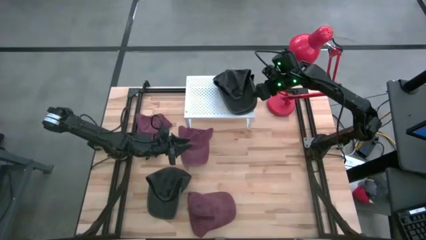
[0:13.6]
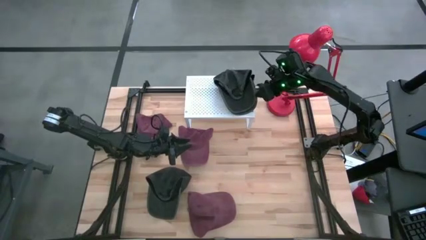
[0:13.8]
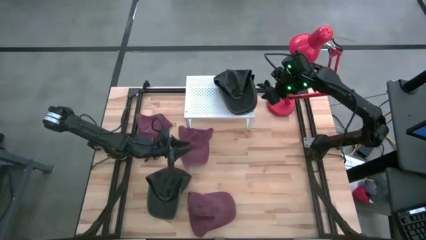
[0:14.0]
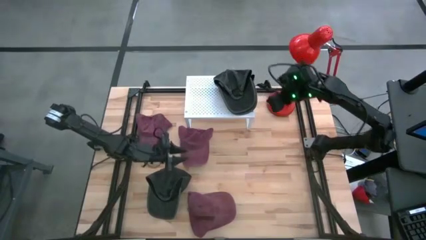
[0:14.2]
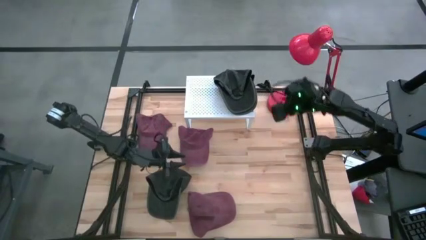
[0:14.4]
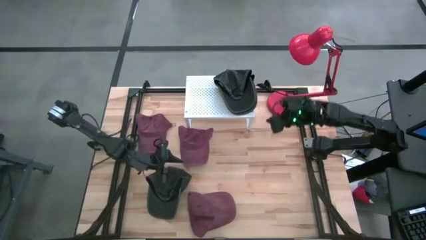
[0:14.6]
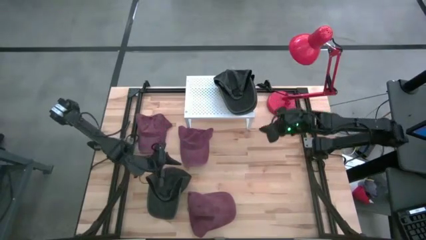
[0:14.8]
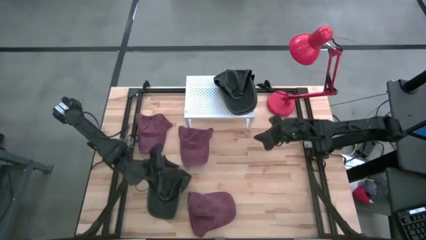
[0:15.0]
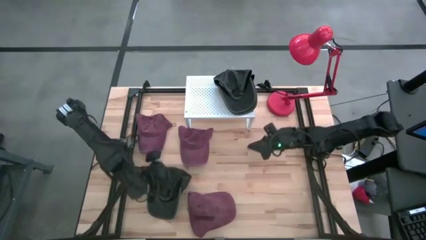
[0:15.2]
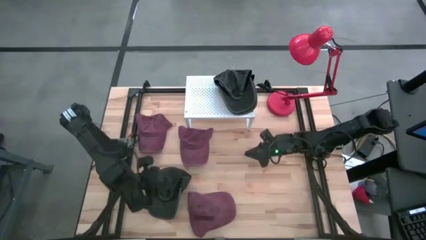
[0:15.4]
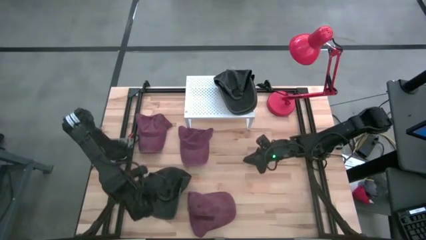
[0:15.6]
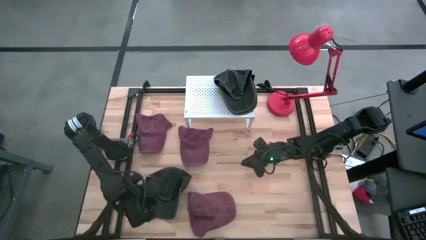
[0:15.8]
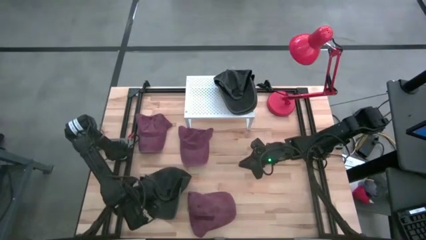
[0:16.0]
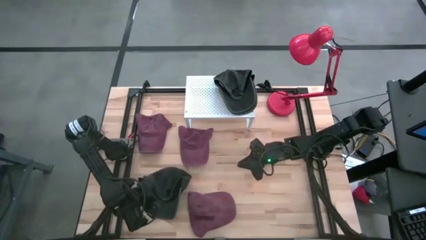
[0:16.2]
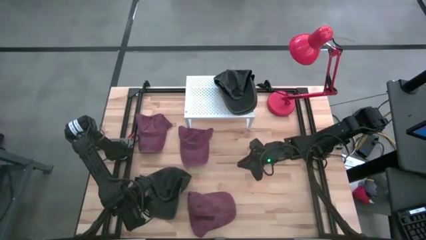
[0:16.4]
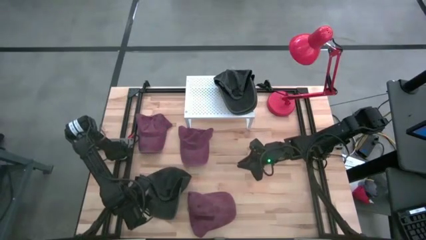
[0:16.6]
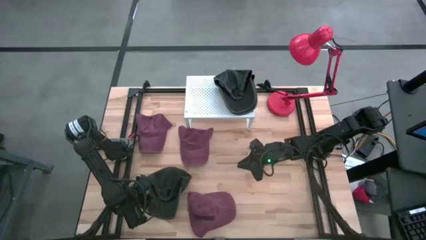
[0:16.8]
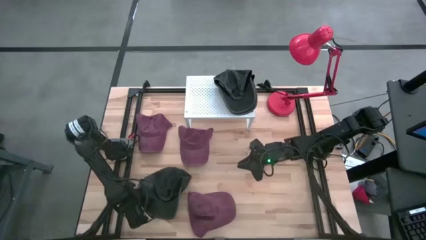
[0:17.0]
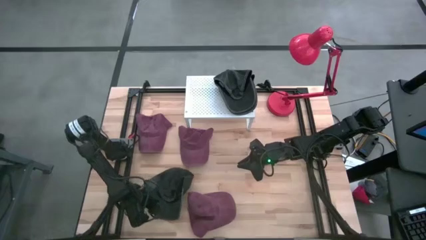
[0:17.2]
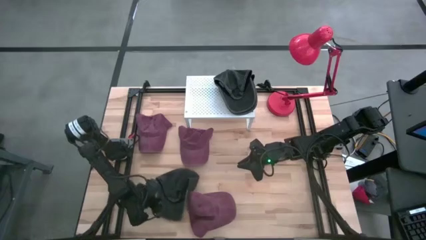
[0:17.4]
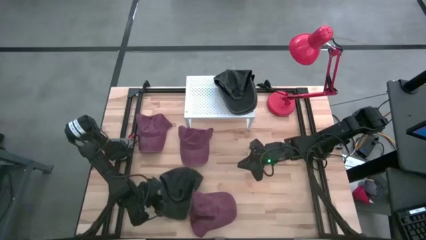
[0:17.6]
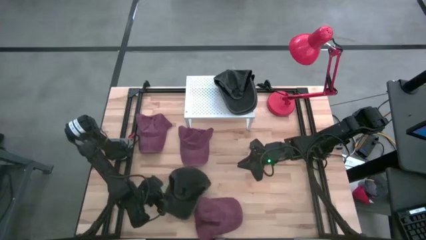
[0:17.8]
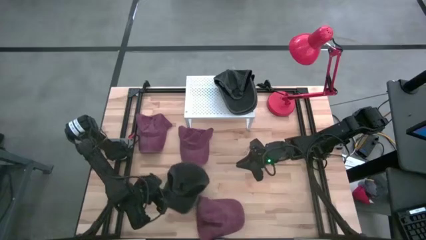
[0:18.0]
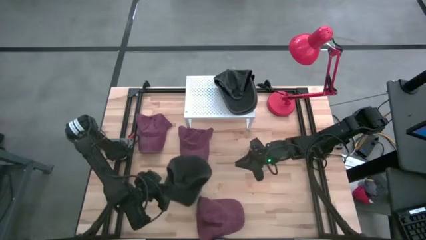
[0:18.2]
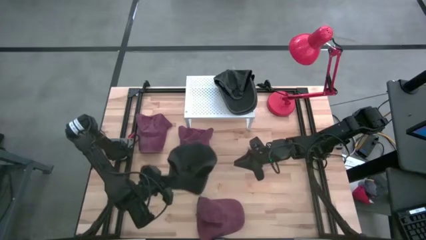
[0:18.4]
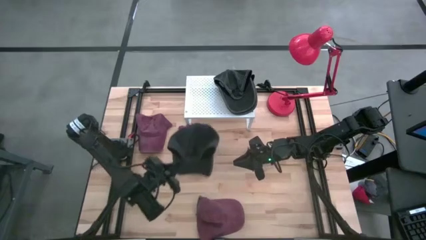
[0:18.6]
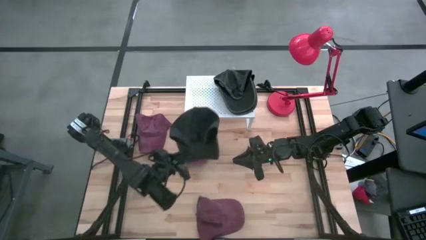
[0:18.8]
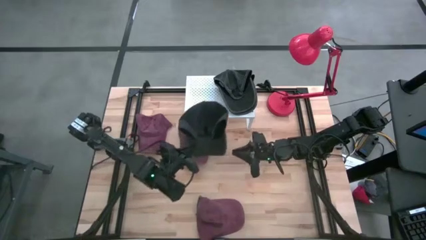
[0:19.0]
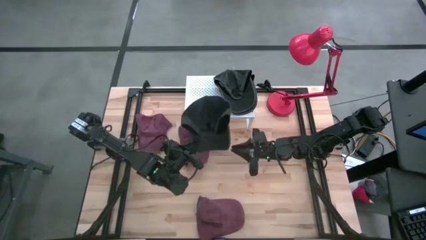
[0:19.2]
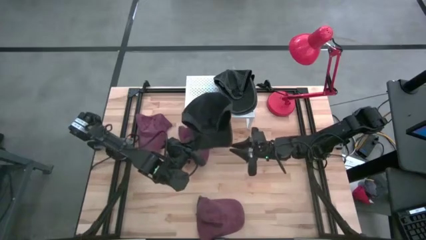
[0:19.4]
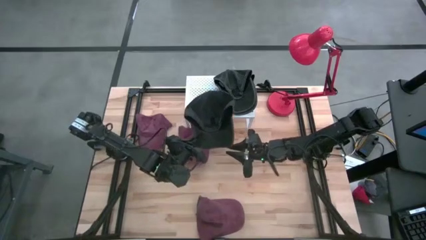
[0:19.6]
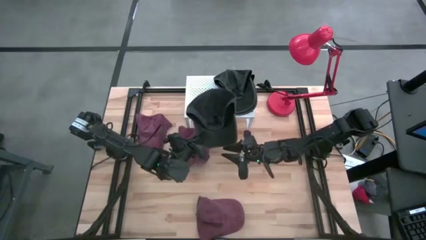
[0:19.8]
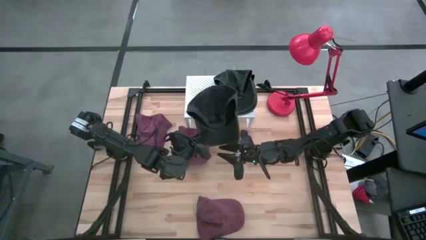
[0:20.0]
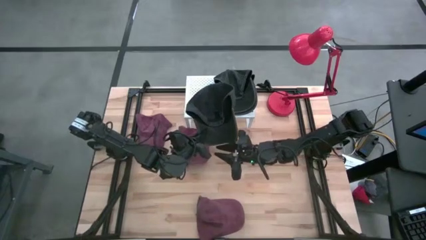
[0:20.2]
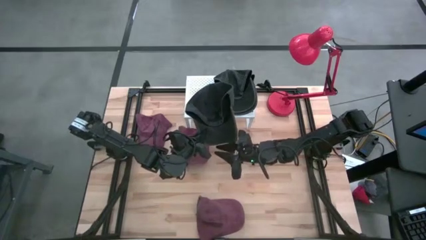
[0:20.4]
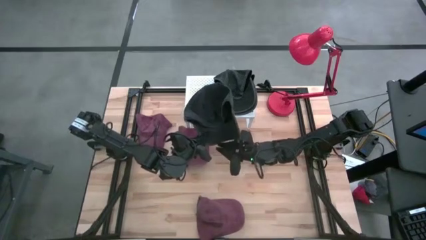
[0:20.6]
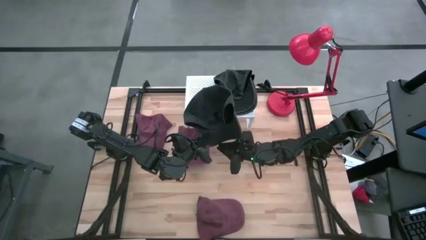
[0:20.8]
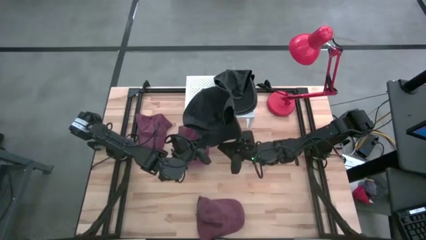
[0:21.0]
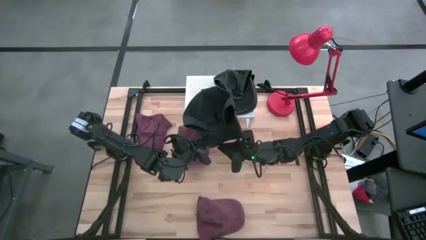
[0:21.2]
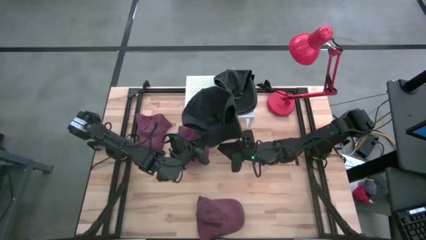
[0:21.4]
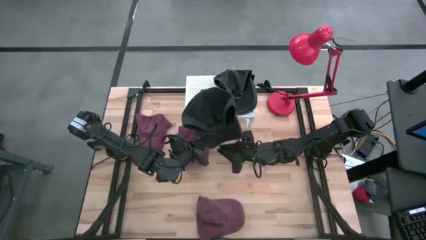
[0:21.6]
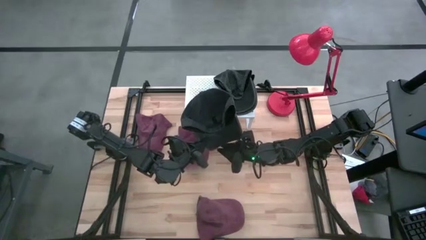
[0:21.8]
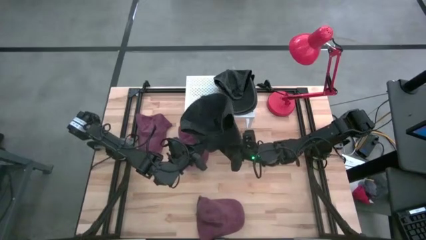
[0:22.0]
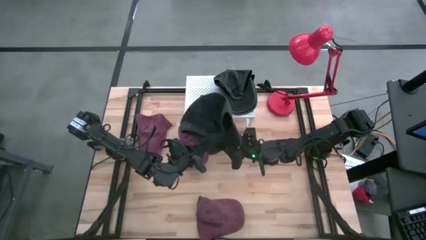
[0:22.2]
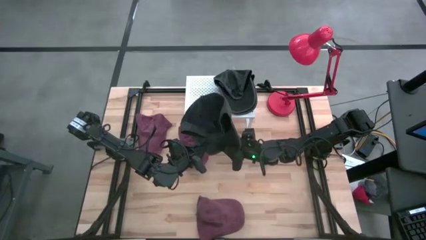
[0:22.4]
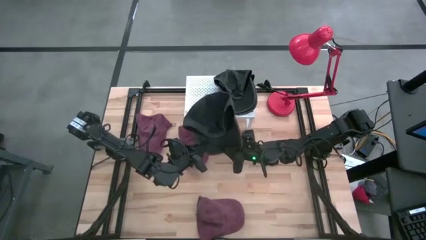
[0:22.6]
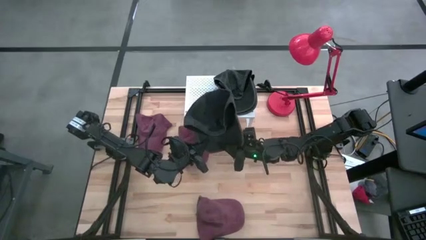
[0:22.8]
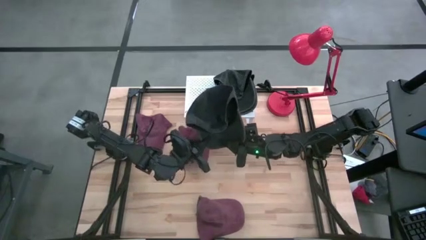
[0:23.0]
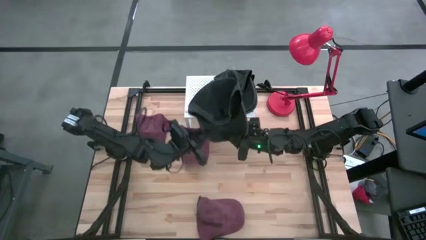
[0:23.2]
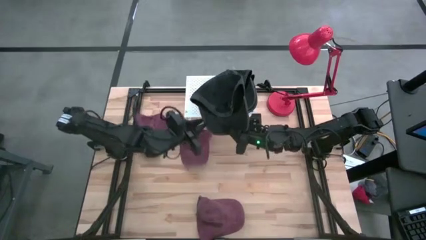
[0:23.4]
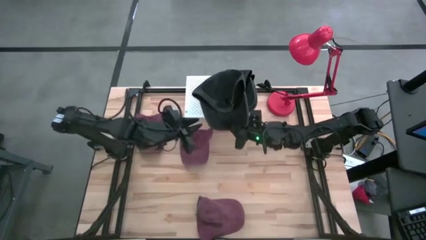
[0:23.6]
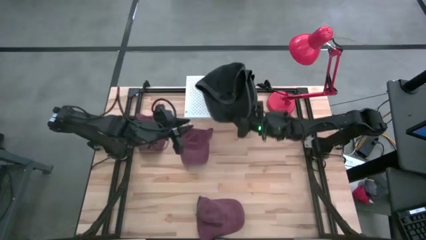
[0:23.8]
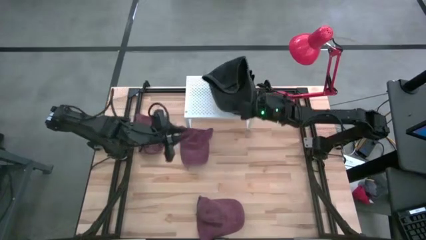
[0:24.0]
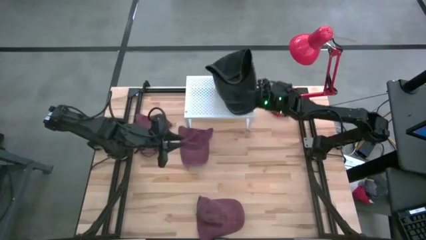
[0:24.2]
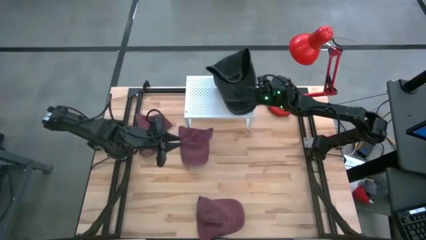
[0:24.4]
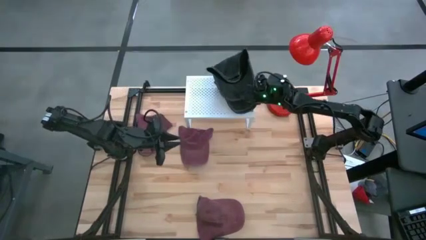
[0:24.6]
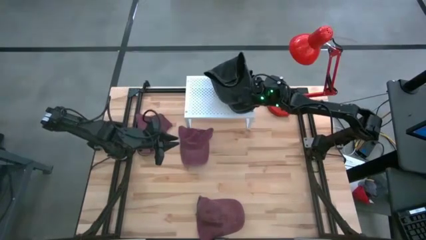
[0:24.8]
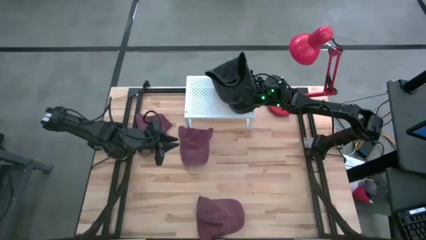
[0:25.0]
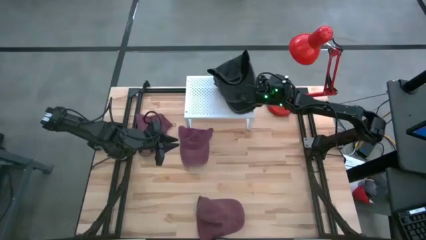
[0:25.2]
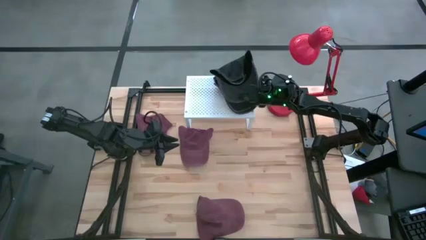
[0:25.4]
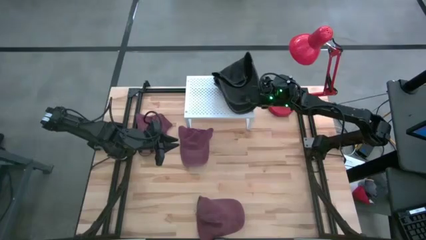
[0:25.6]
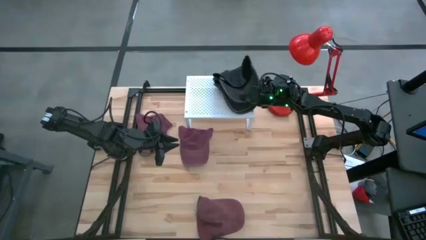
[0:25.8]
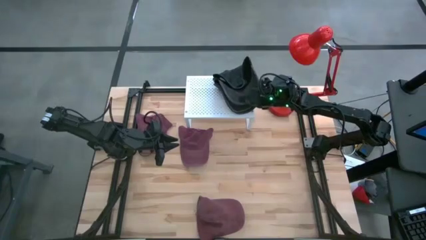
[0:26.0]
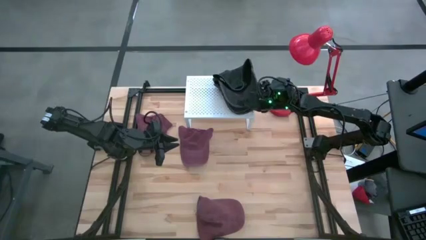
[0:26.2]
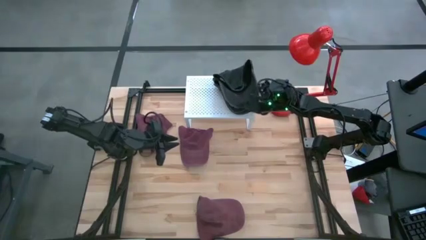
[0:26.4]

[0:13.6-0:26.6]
Task: Pick & Place hat
Stack the black cap on the black caps on the shelf

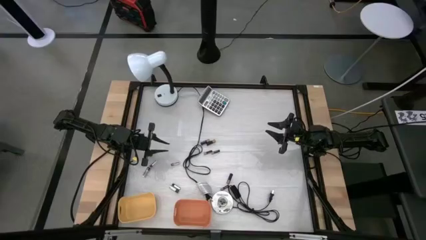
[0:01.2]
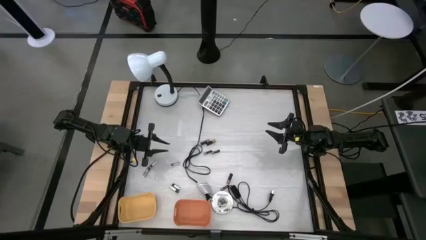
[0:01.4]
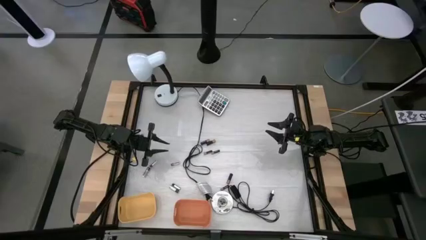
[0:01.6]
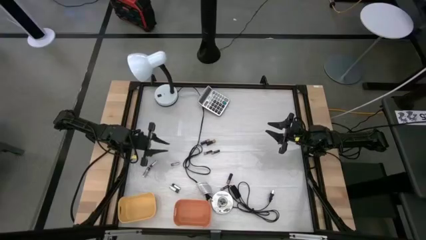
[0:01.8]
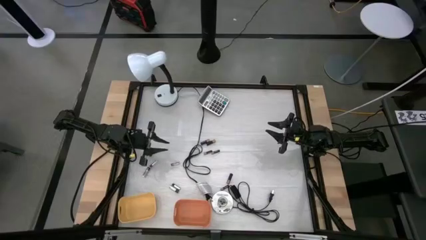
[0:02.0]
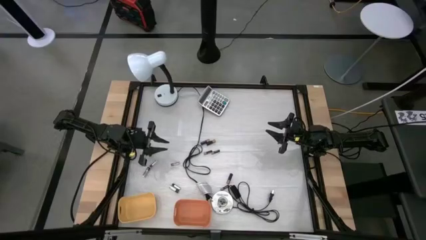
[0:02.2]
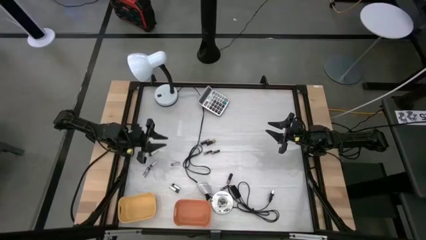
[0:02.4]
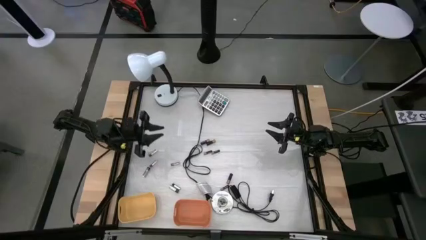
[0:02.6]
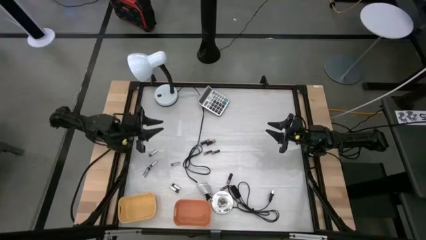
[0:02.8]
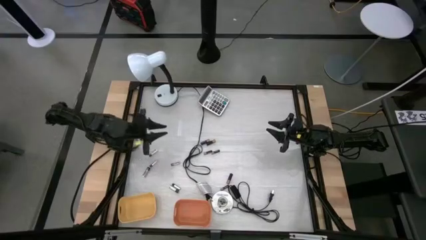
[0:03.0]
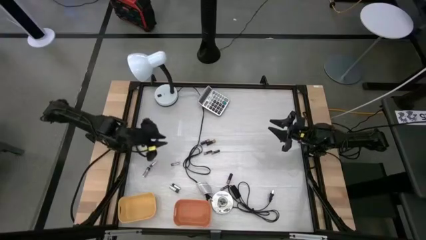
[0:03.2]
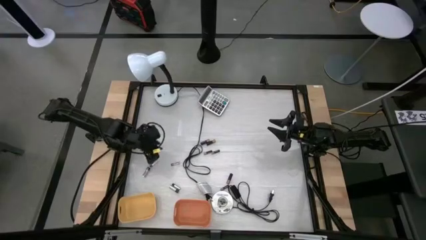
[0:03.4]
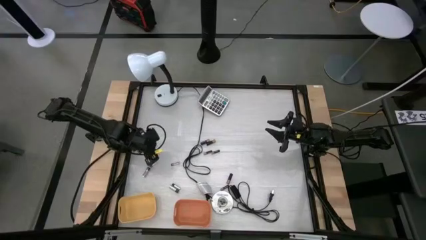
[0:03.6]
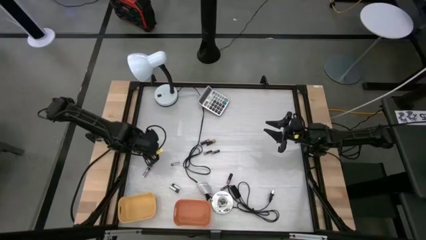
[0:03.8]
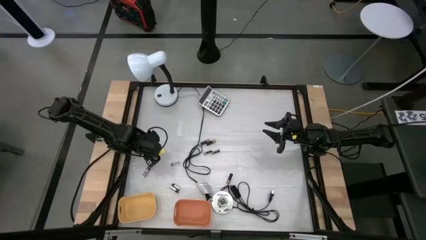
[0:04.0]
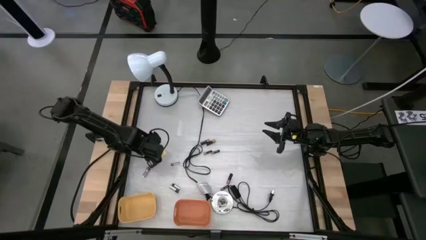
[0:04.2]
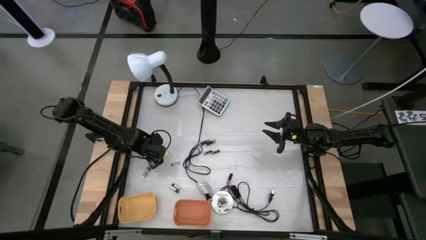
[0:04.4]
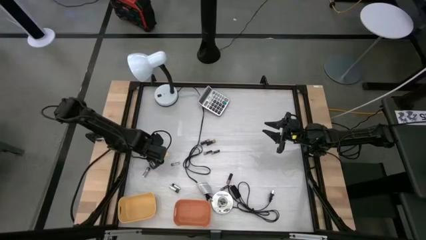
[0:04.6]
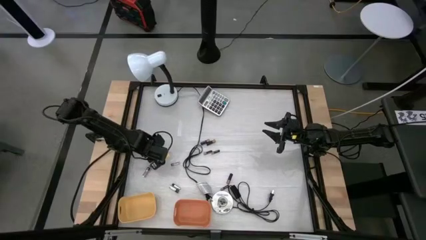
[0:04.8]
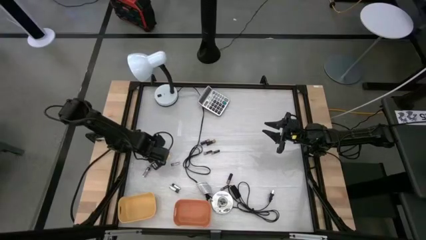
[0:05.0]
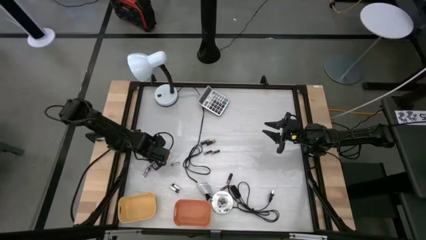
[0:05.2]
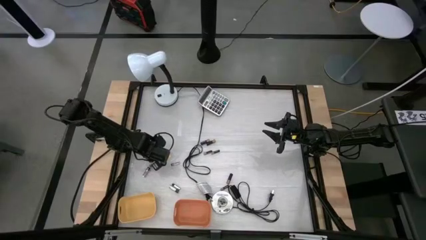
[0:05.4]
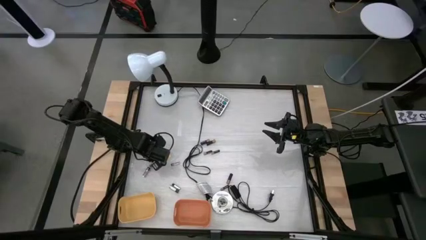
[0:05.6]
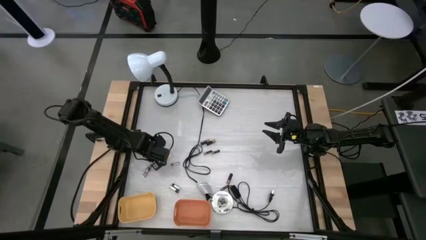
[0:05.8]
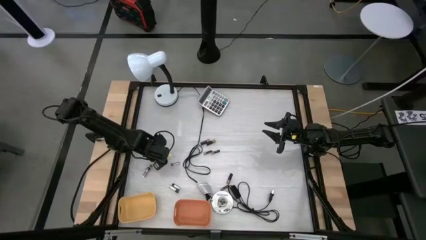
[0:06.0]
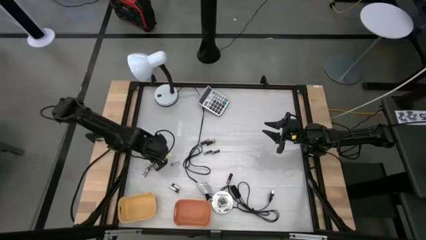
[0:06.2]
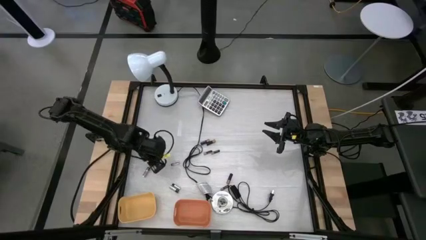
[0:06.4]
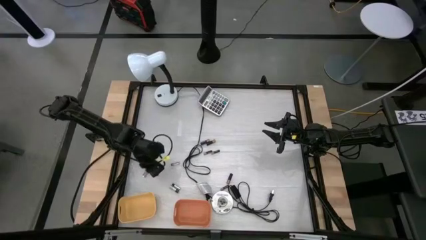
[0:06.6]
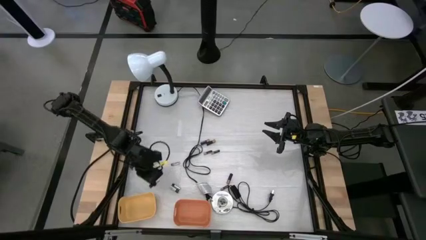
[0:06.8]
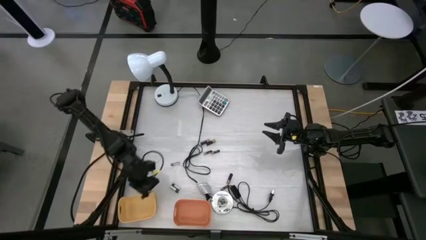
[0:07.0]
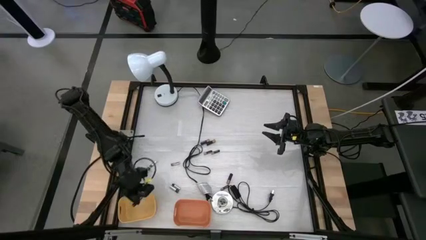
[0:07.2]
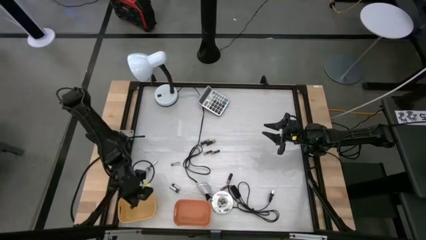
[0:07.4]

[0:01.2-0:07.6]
Task: Sort batteries
Put the white battery into the yellow bin
